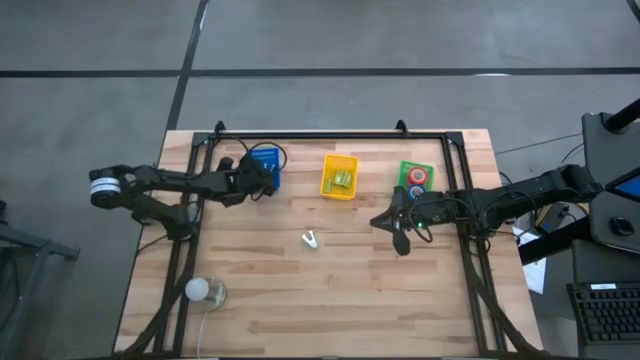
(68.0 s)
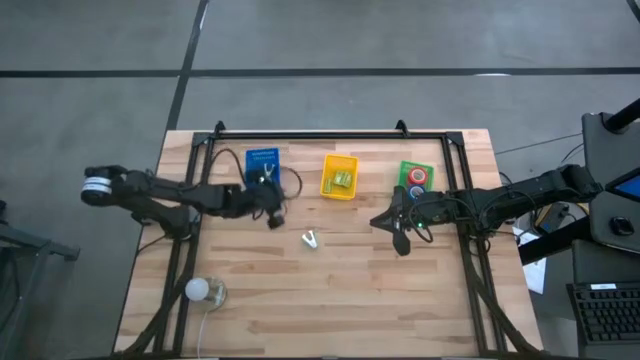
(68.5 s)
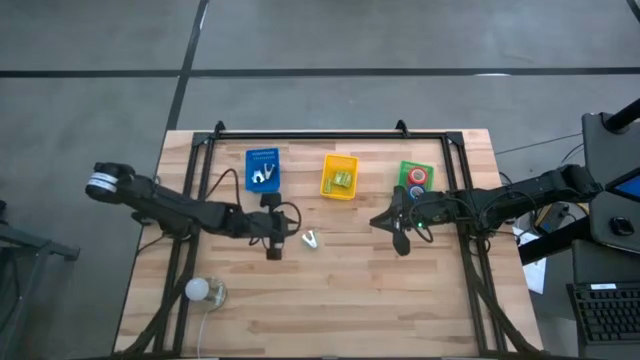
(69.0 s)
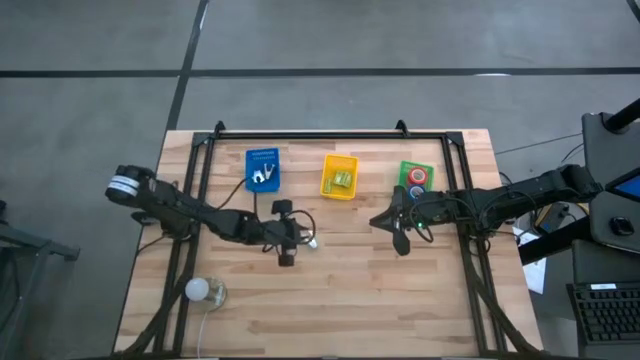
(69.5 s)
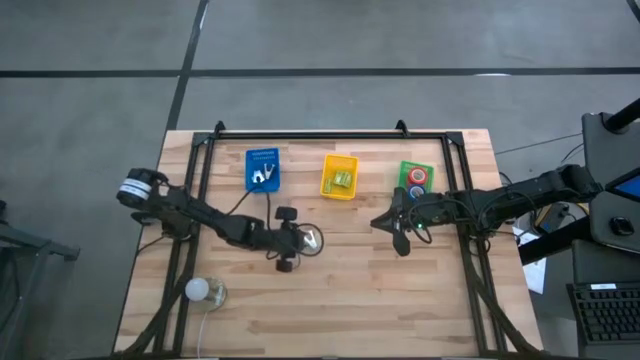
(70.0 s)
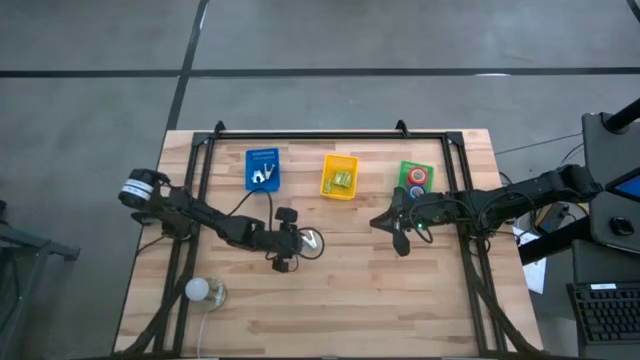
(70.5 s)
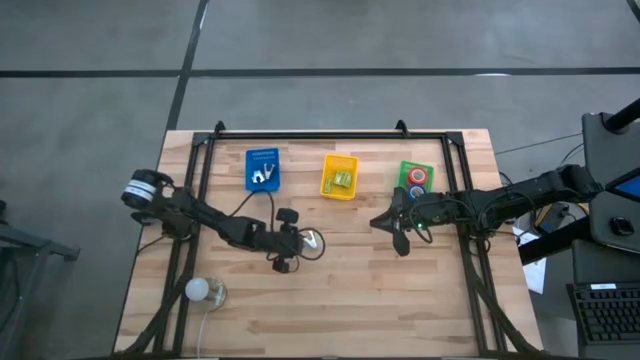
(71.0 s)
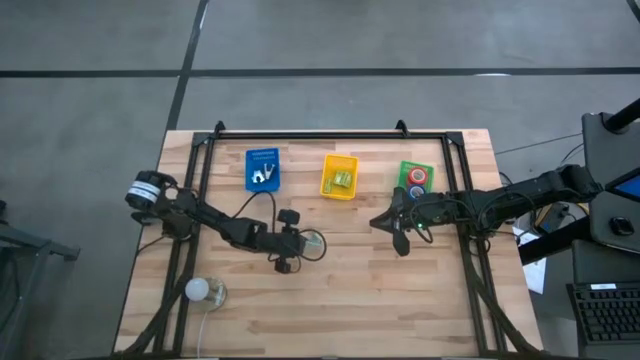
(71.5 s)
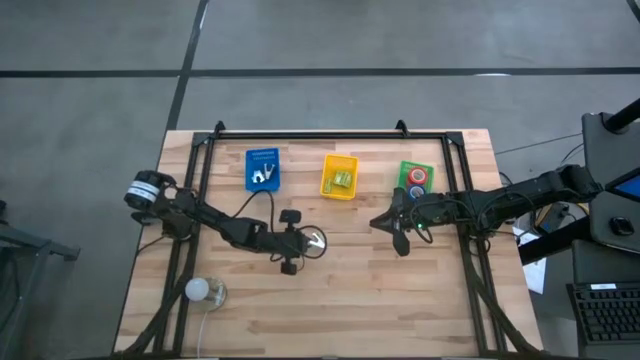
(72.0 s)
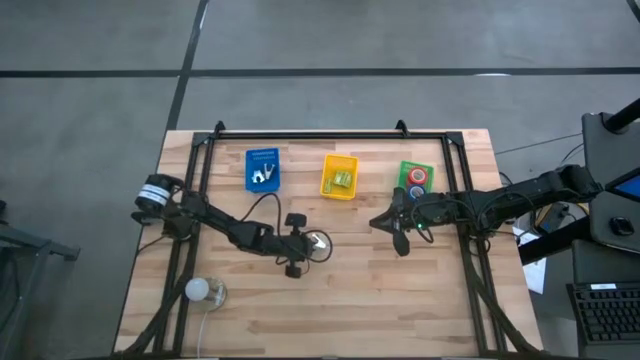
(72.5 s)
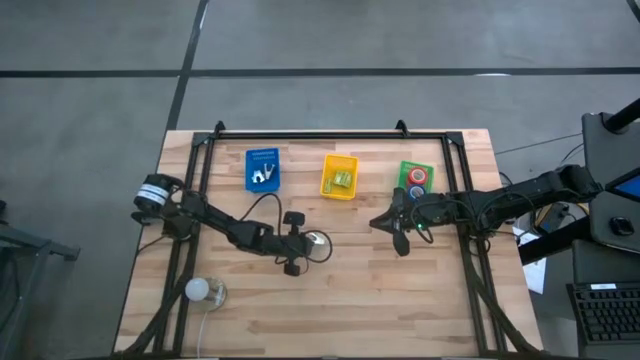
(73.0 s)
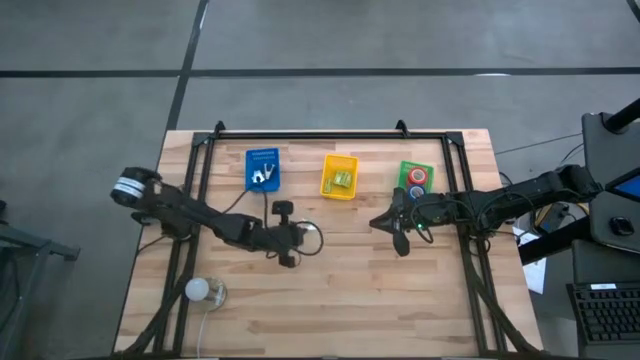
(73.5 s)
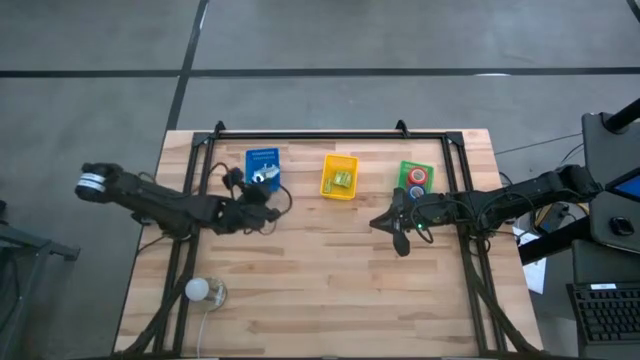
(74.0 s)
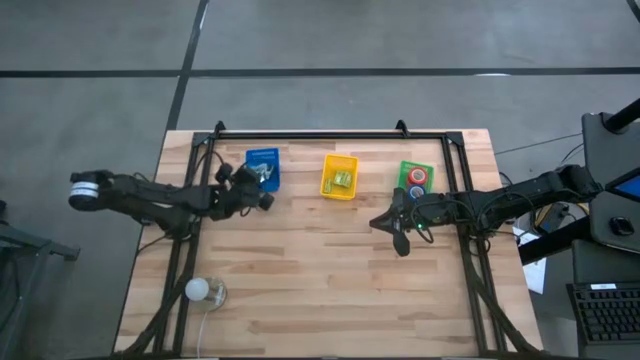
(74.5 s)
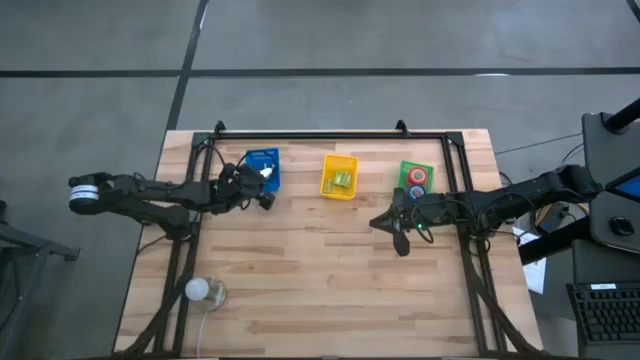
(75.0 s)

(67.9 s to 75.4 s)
Task: Pick and place Stapler, Stapler remover, tape
Put the light blue staple remover into the blue bin

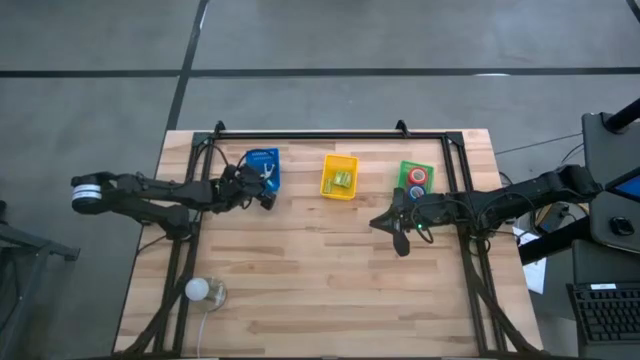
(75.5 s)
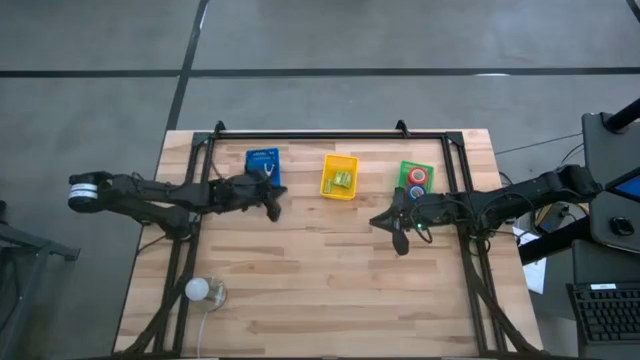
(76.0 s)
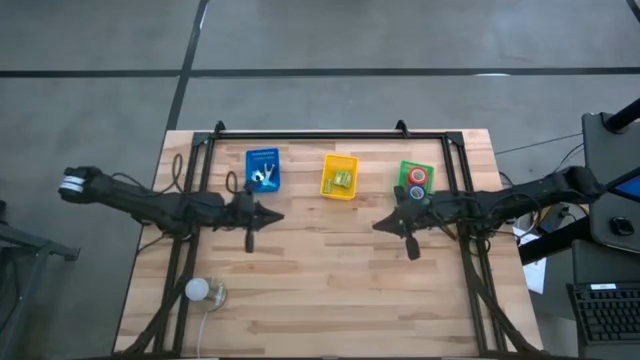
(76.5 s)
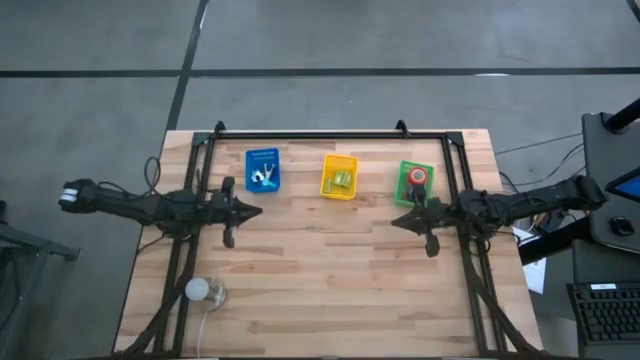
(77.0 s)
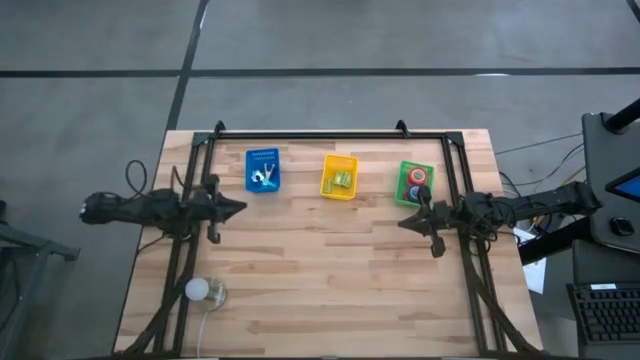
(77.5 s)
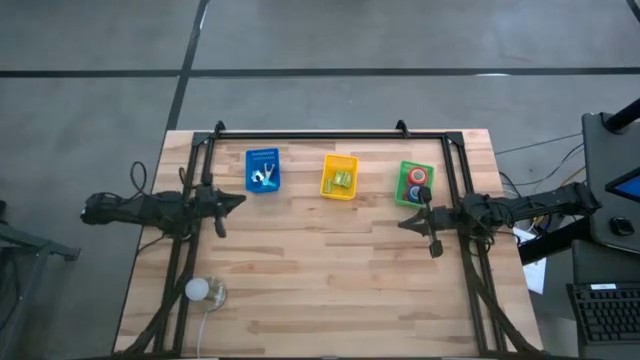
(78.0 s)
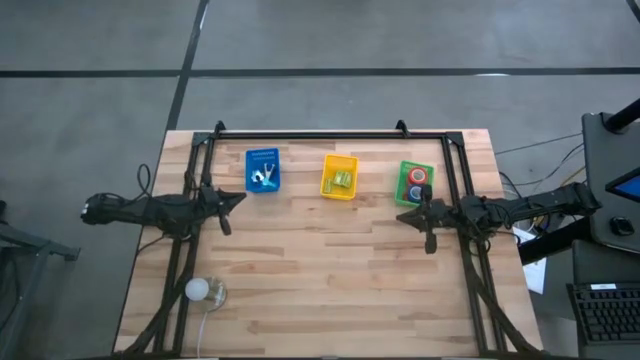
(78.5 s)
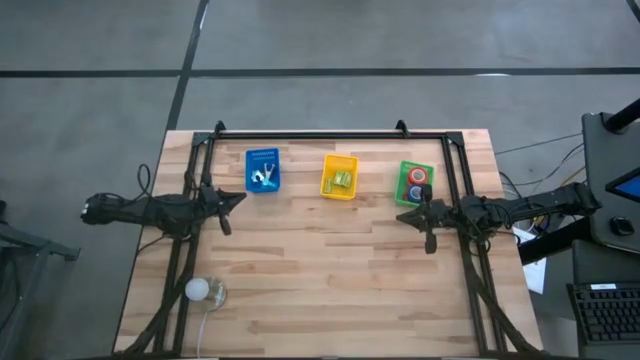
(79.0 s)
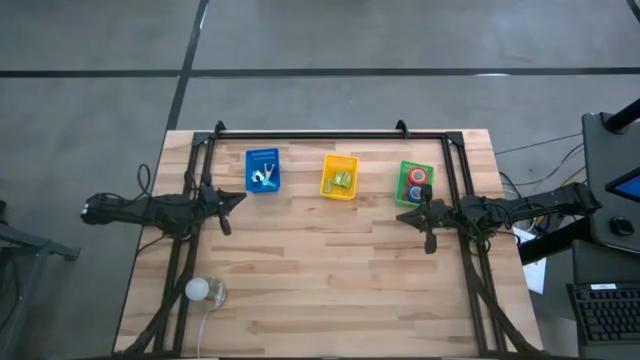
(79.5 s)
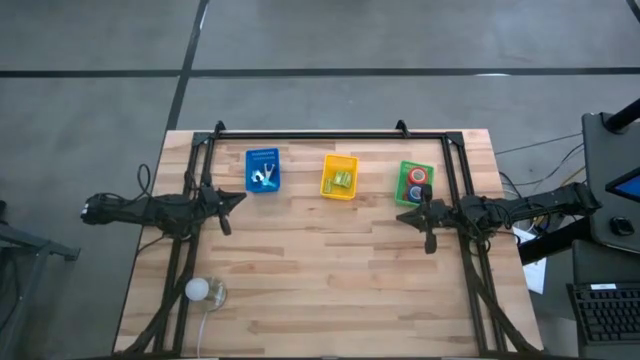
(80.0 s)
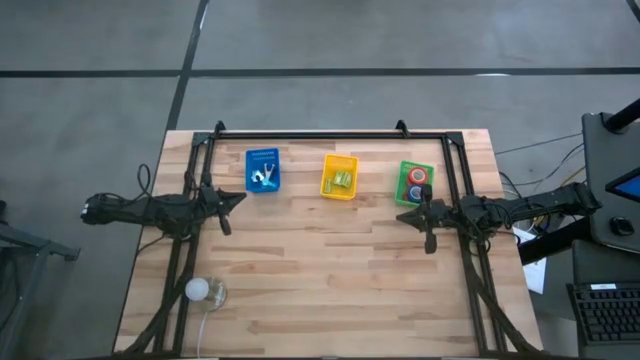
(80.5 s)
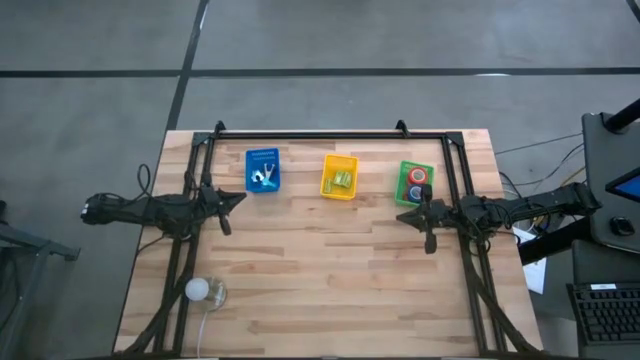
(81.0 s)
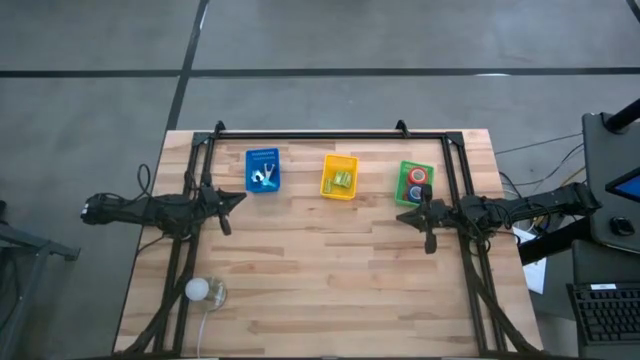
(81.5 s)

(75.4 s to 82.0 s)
Return to Home Position

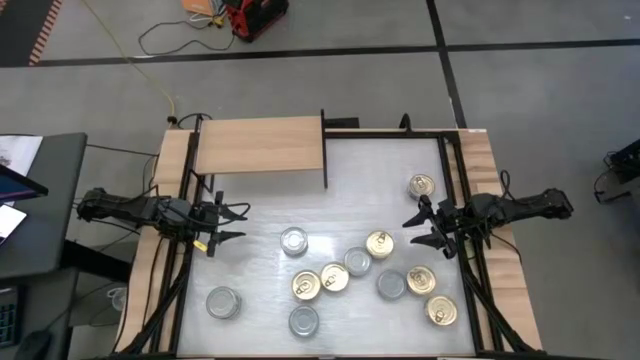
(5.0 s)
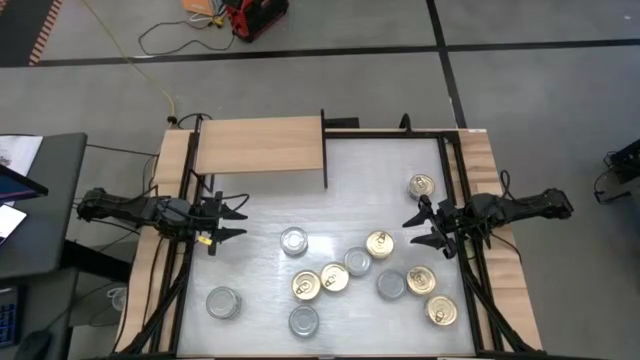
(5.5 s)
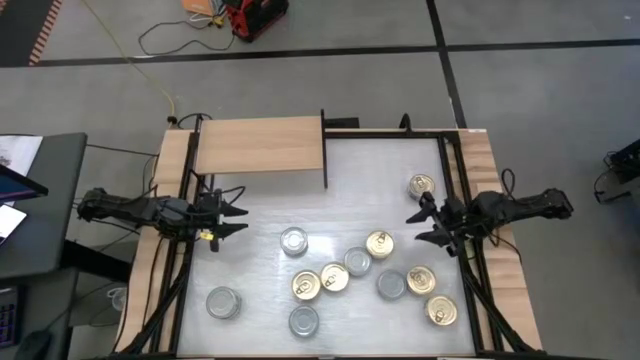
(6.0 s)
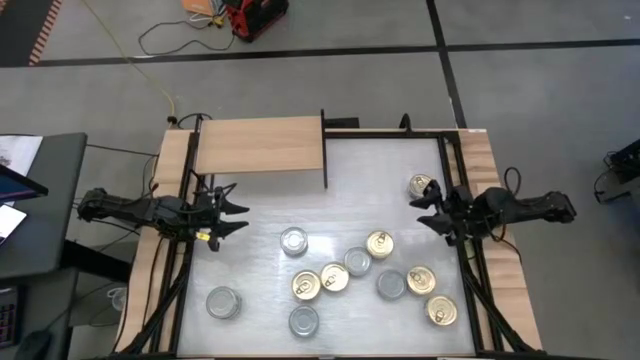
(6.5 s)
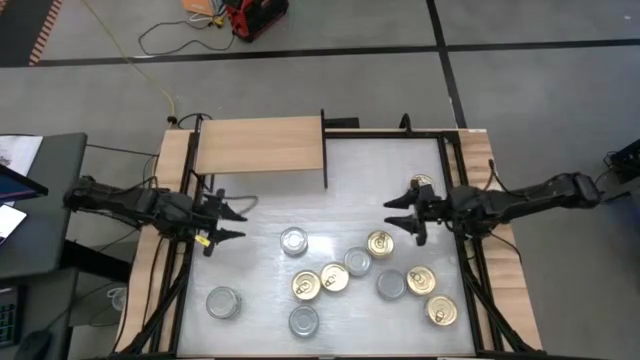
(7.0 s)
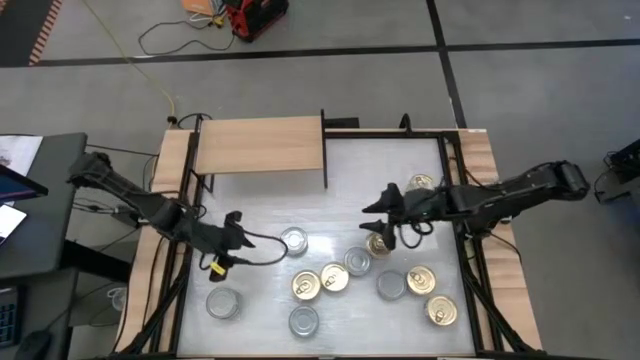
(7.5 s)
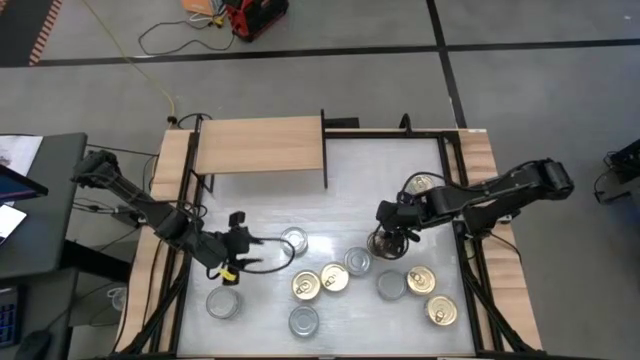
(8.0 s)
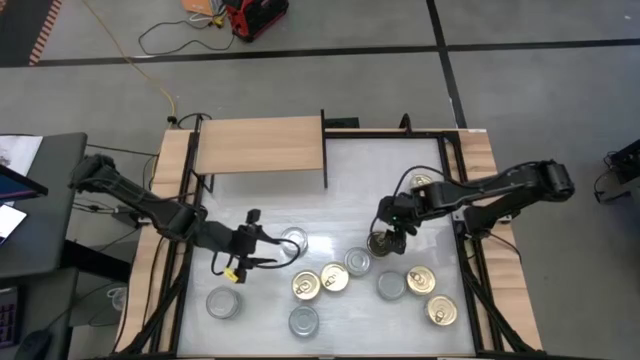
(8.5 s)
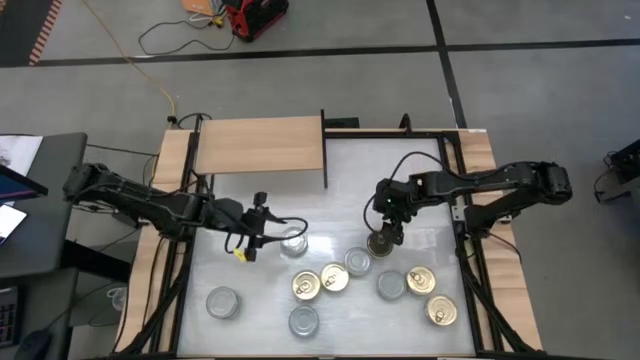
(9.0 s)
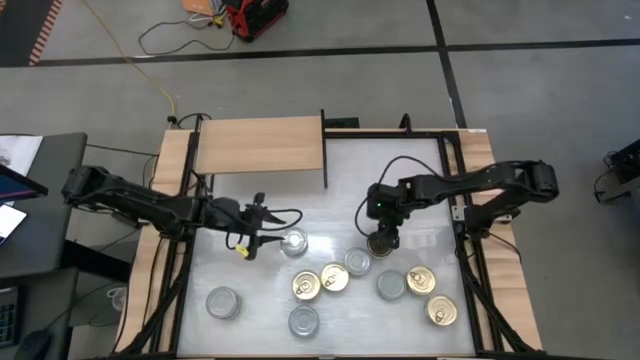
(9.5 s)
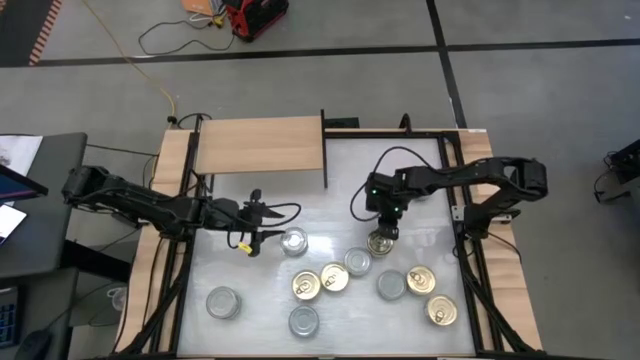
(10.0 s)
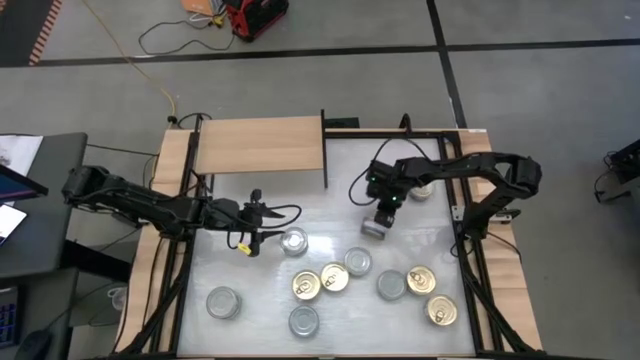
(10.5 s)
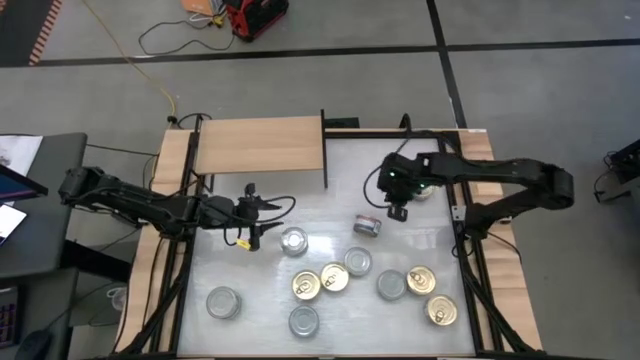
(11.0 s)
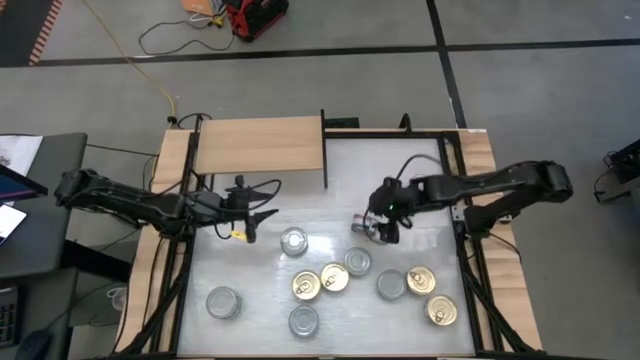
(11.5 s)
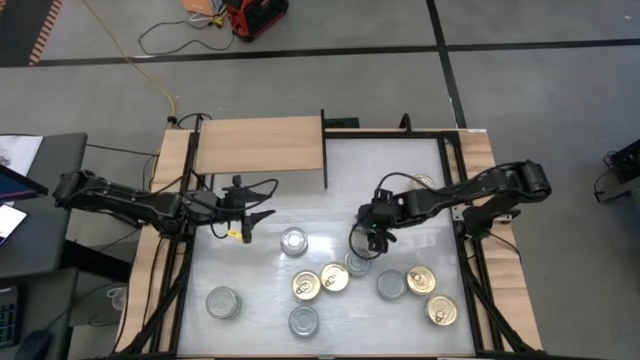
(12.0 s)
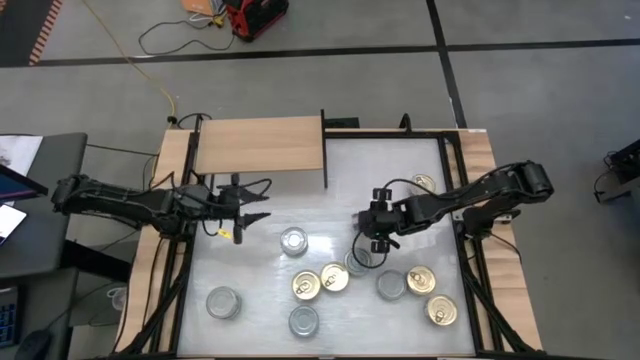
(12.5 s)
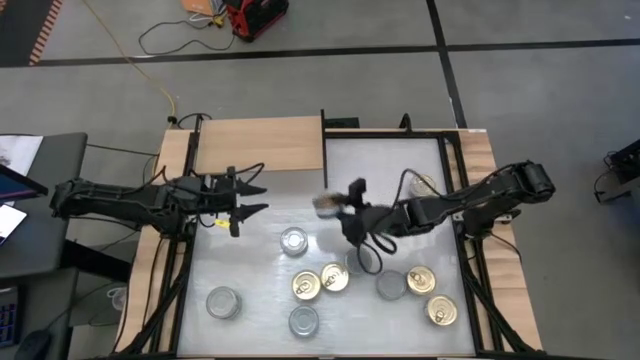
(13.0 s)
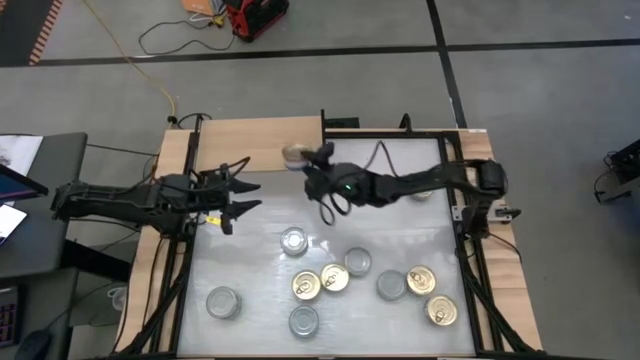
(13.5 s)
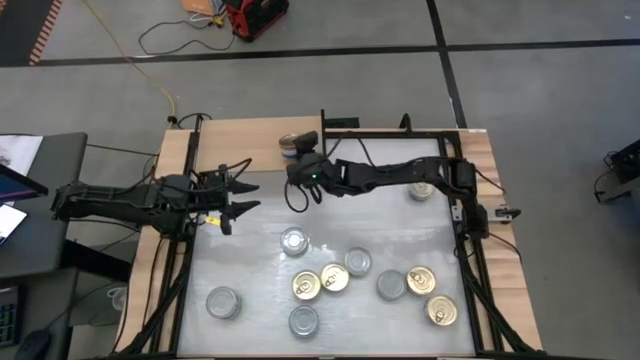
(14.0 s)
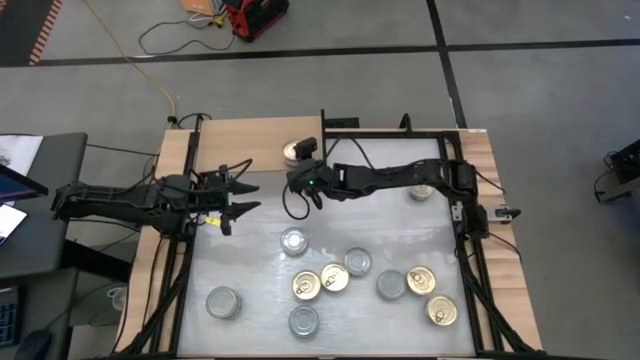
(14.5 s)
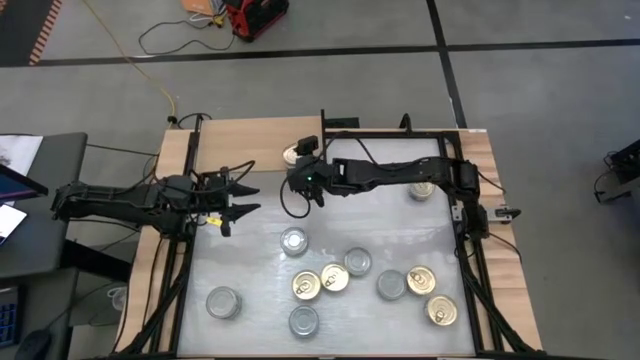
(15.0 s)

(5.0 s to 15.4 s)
Task: Stack canned seafood by type on shelf
Put the blue-pink tuna can on the shelf
